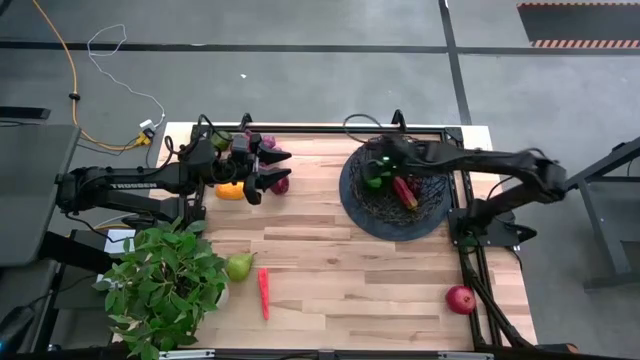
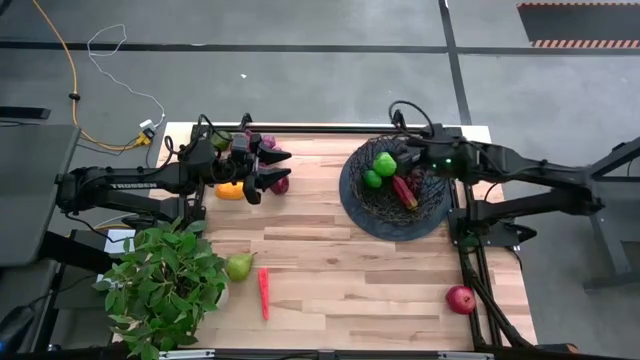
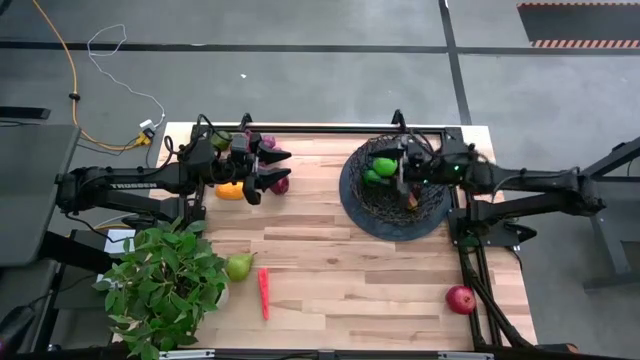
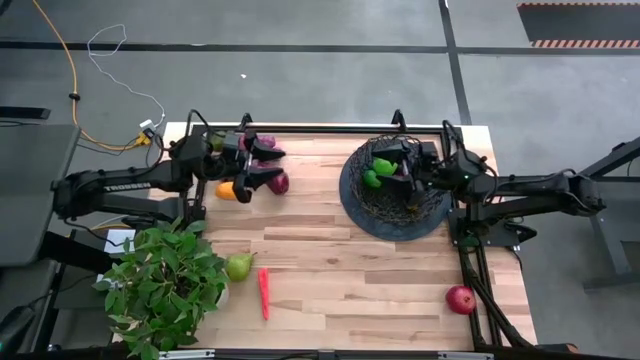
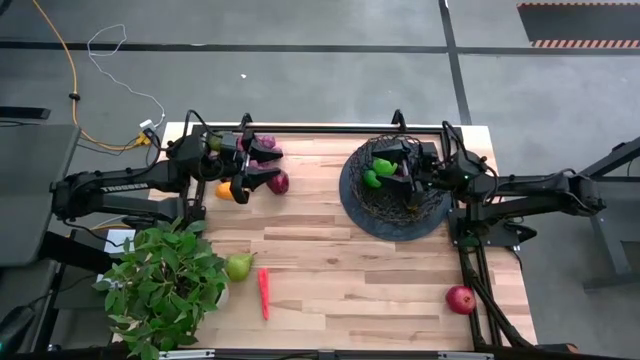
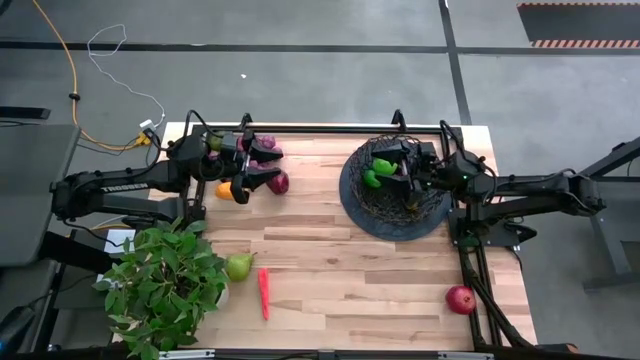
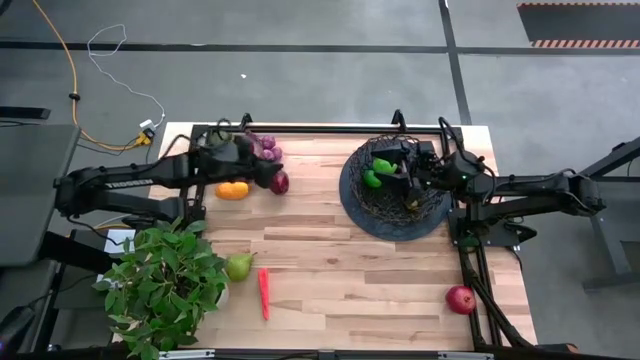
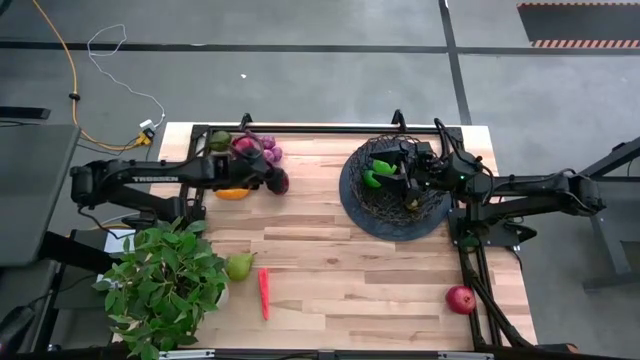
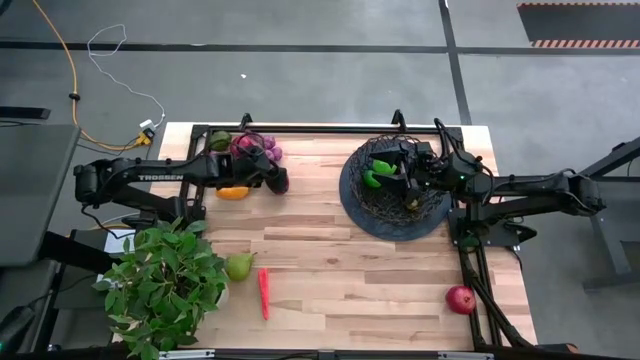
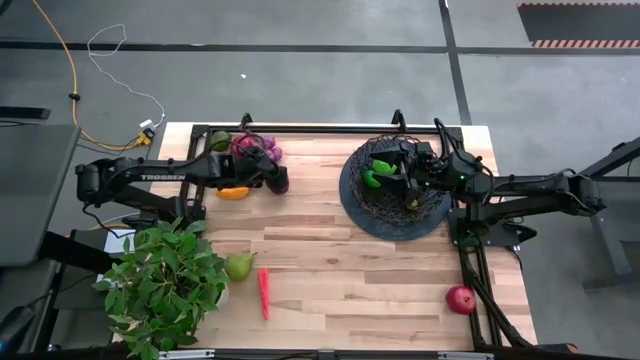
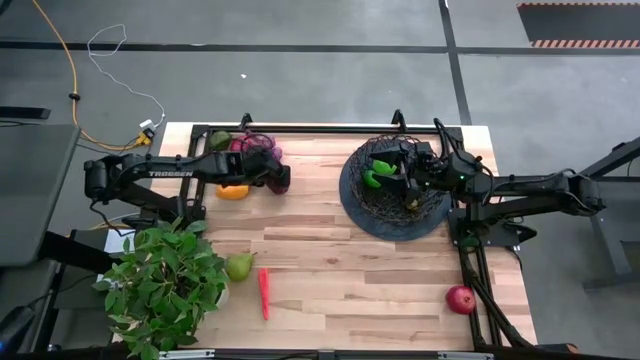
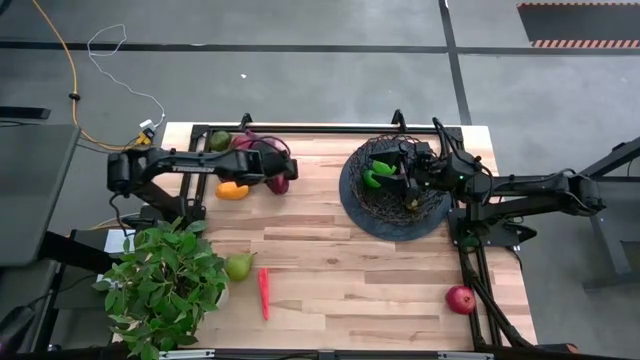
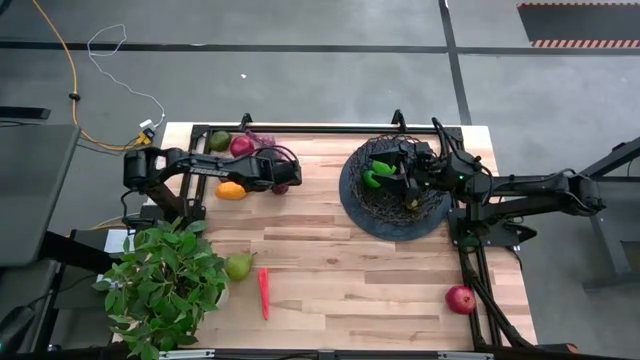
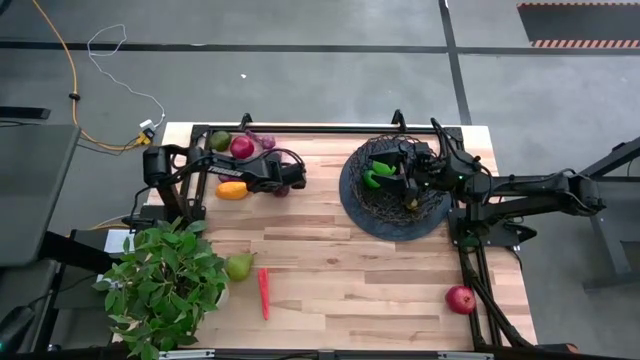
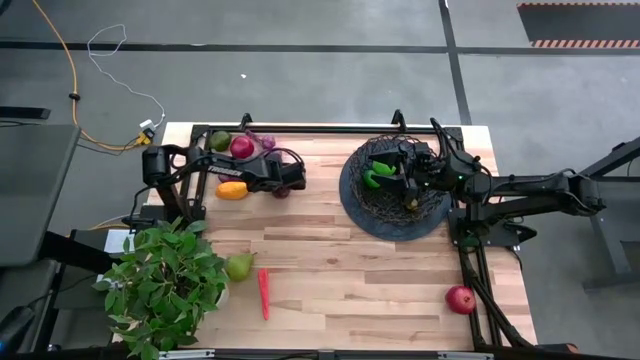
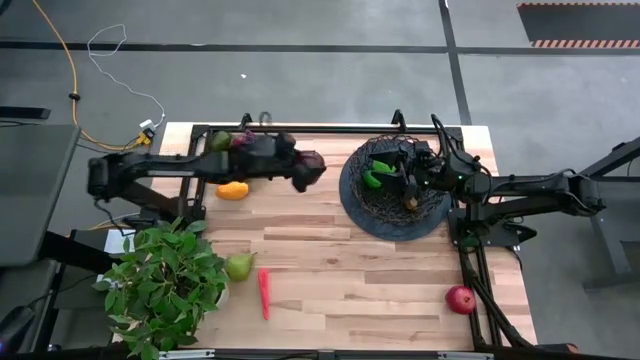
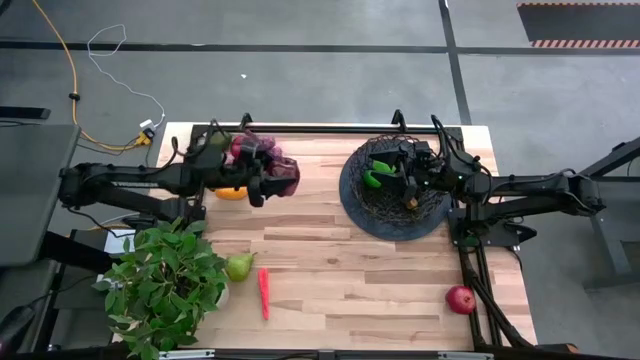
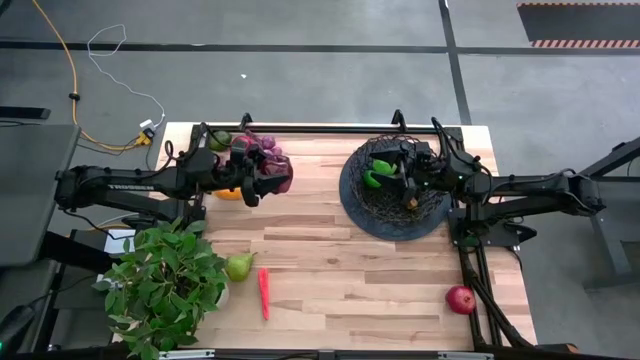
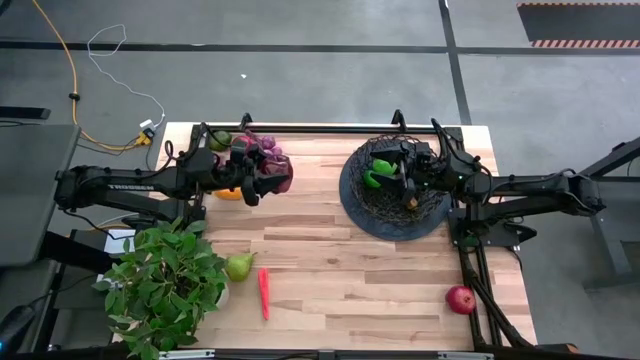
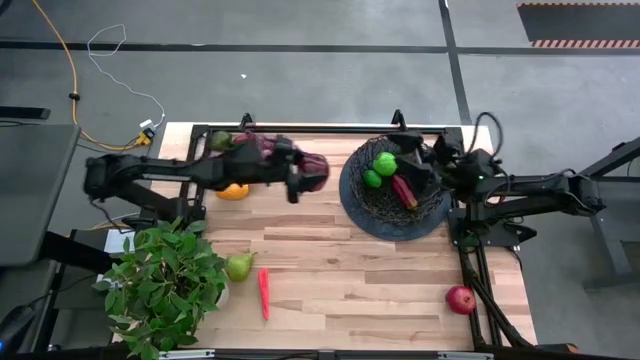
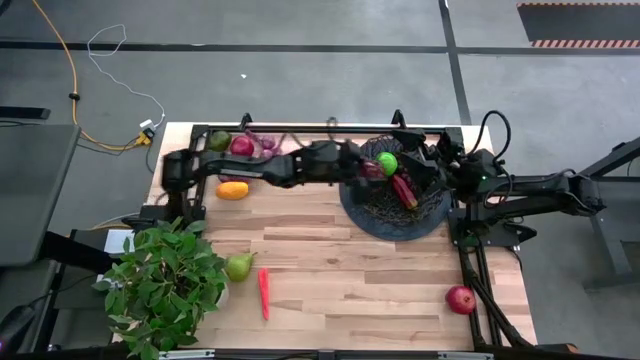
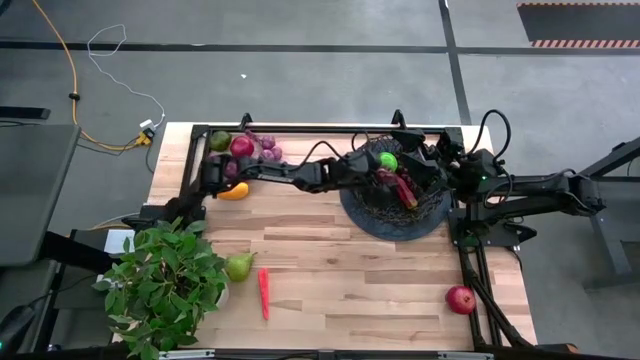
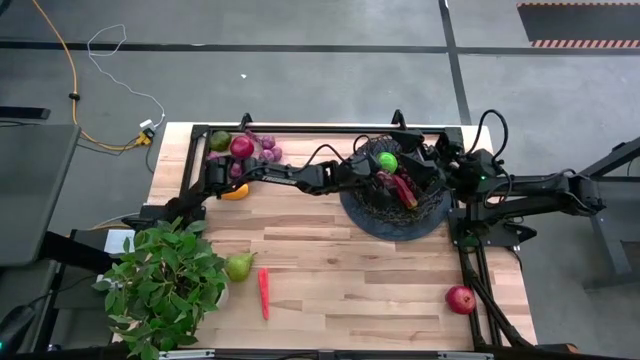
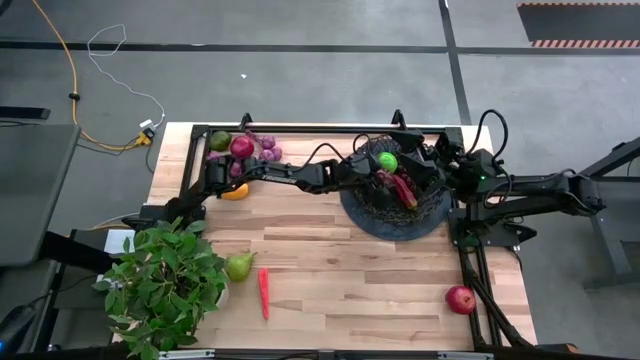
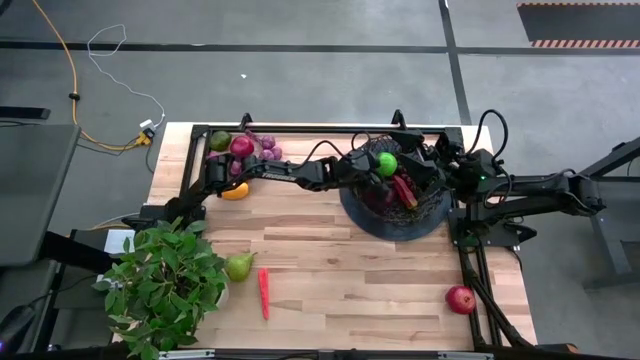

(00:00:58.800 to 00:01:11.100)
Task: Build produce basket
Put the red apple into the black wire basket

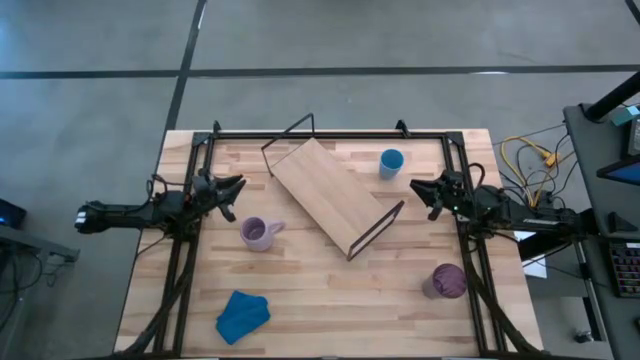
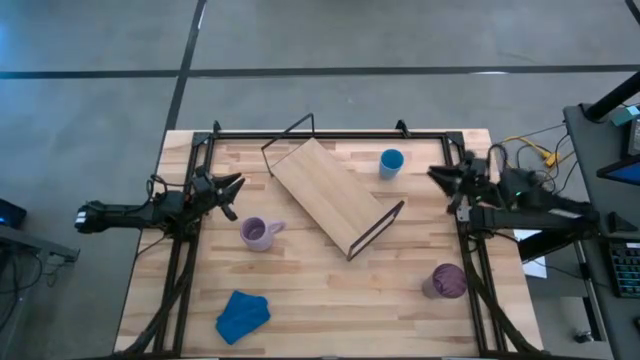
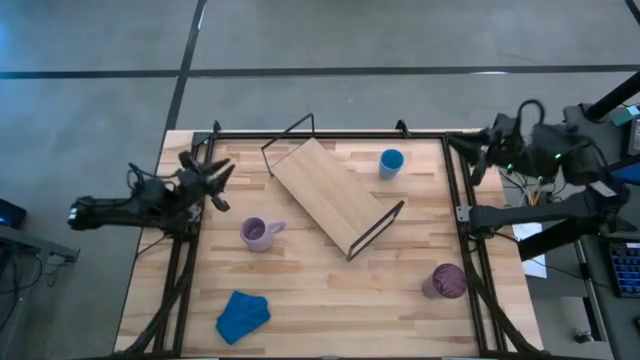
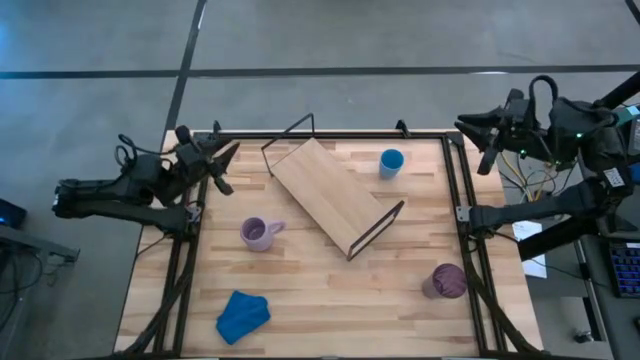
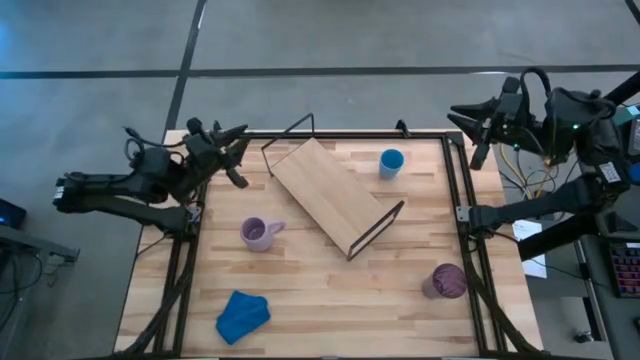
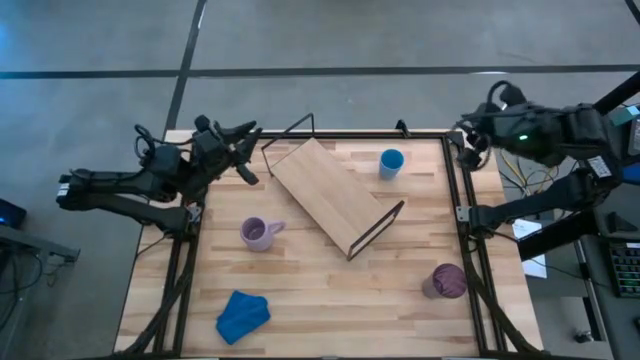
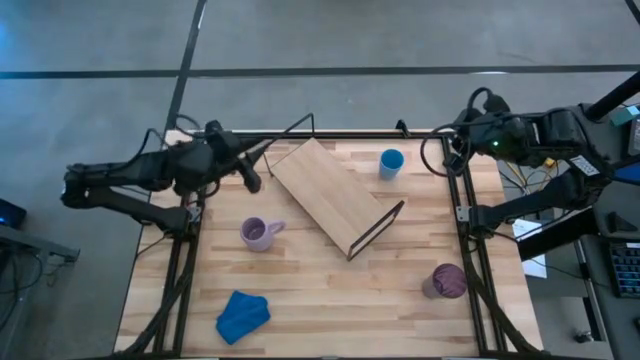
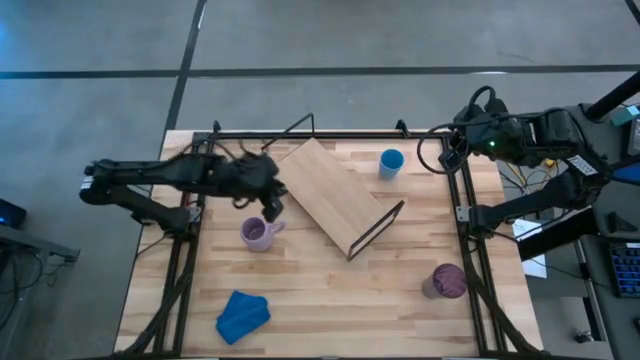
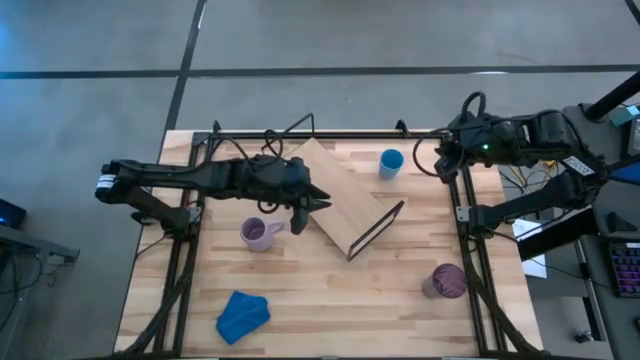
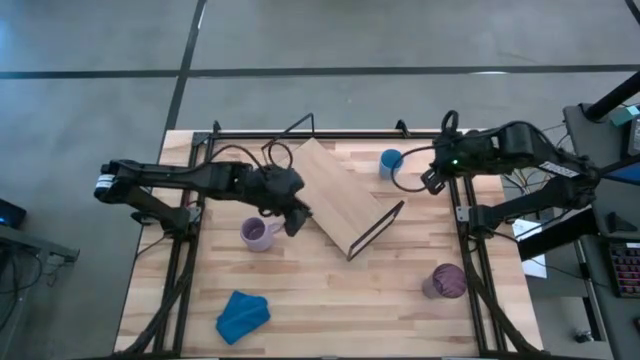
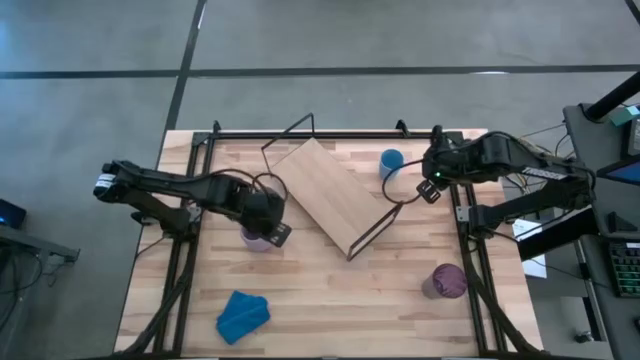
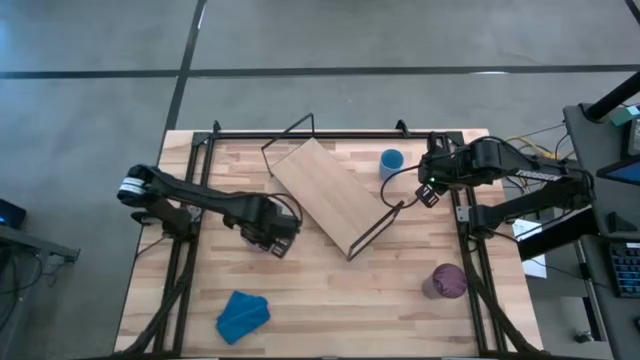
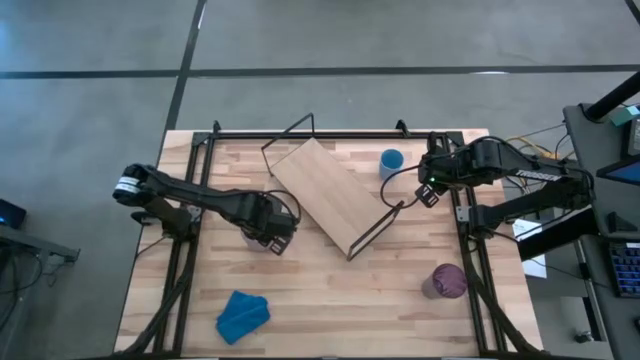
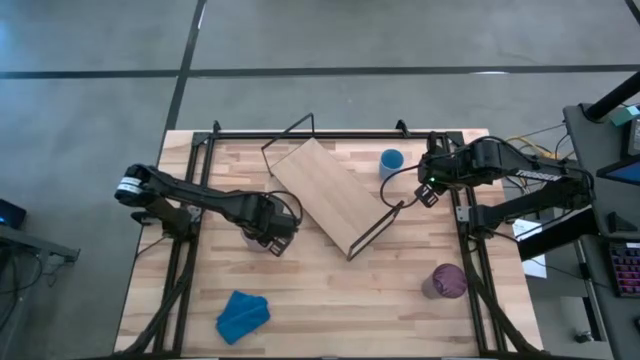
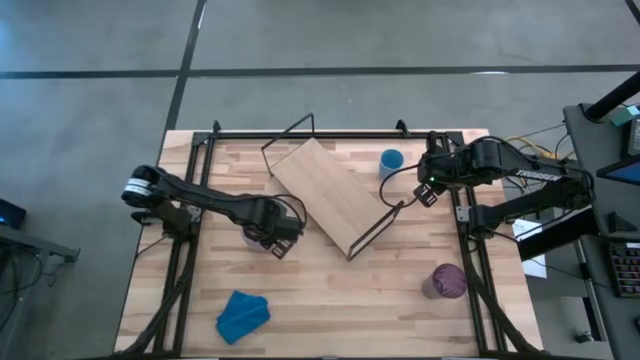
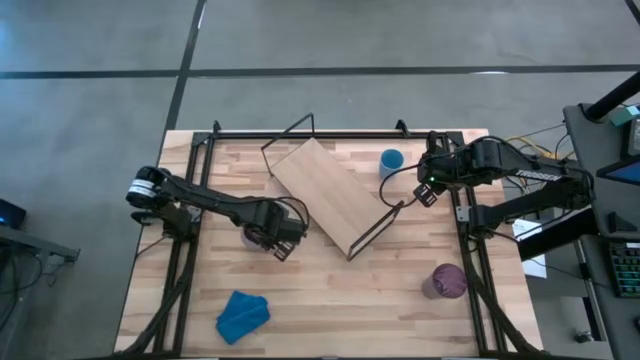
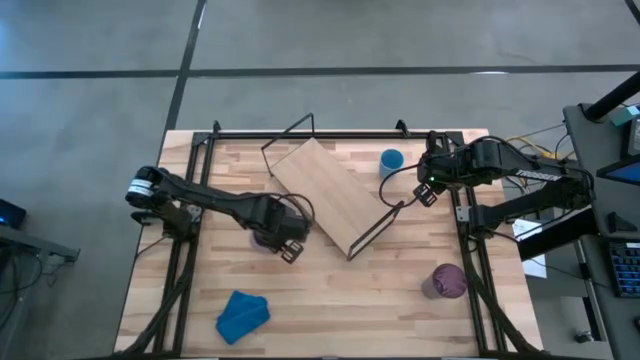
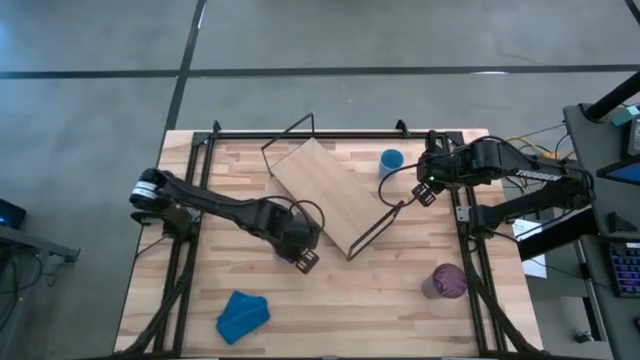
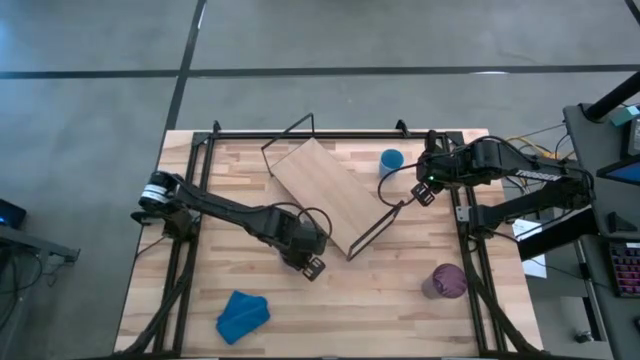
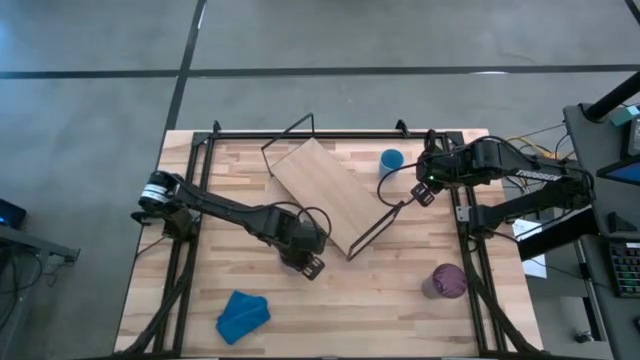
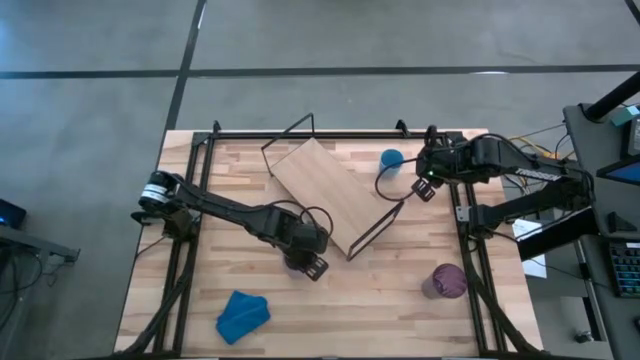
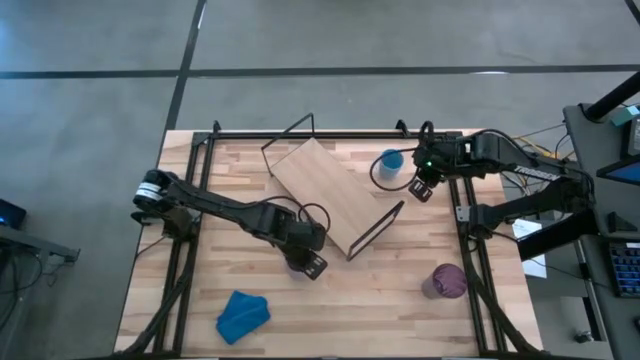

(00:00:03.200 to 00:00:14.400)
Task: Stack small to large cups/mugs on shelf
Adjust the purple mug on the table
